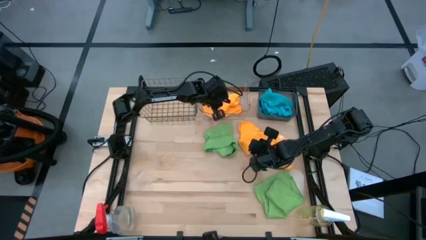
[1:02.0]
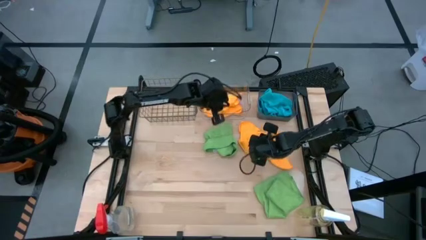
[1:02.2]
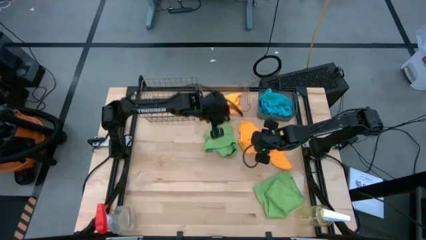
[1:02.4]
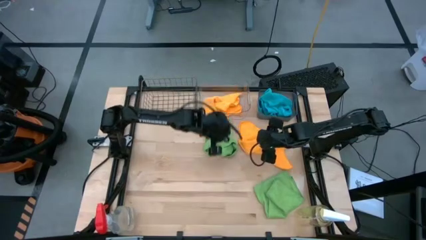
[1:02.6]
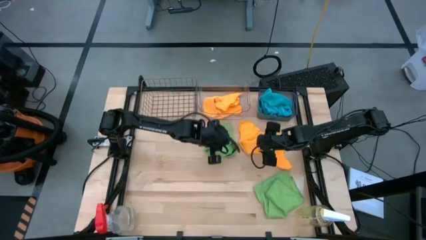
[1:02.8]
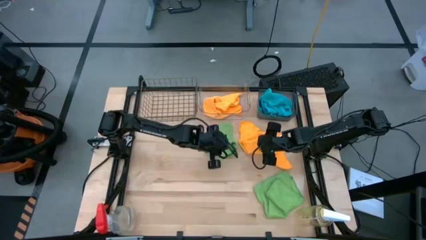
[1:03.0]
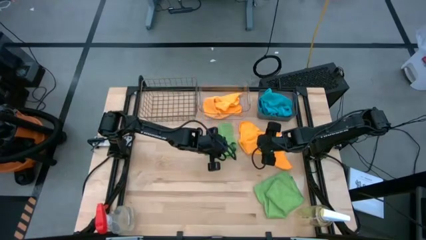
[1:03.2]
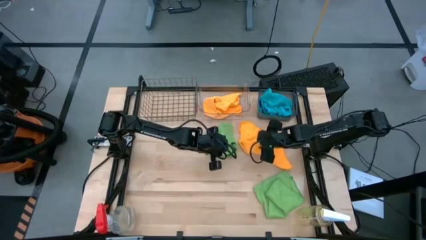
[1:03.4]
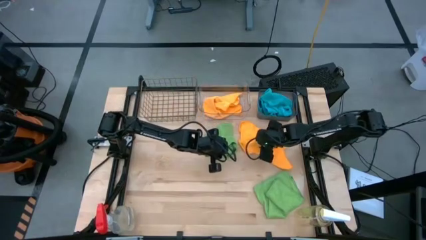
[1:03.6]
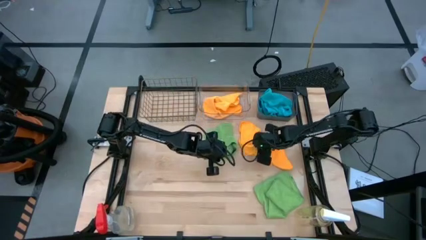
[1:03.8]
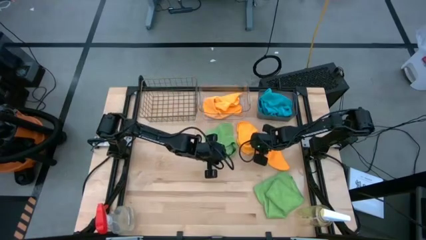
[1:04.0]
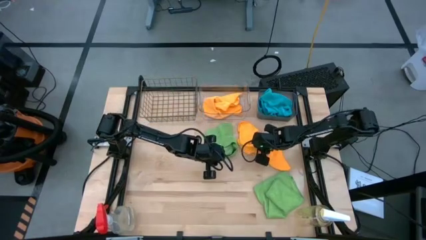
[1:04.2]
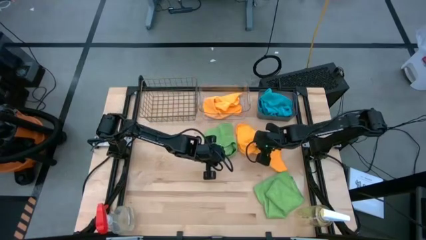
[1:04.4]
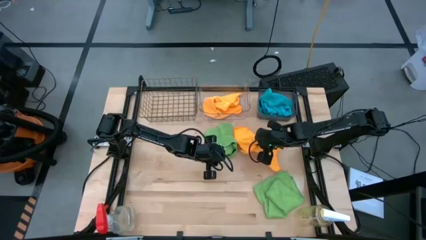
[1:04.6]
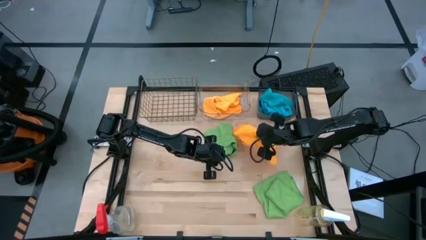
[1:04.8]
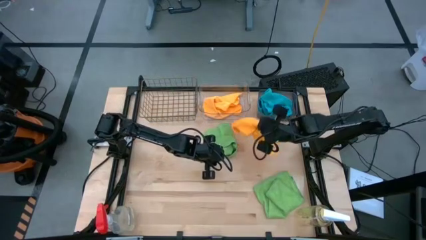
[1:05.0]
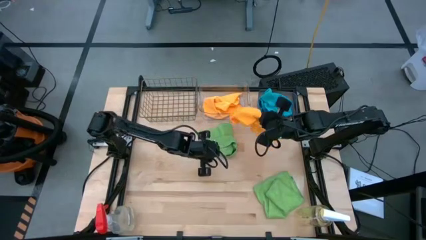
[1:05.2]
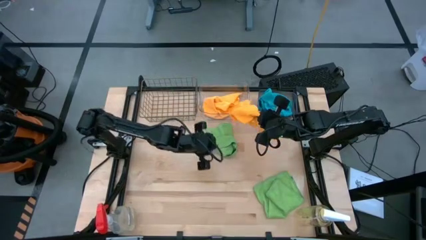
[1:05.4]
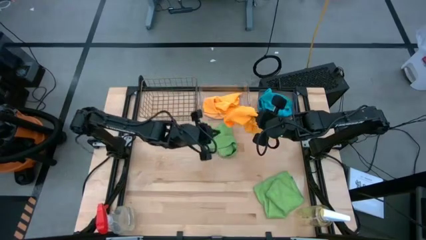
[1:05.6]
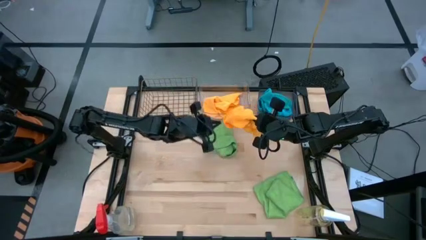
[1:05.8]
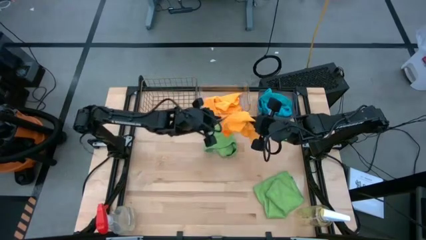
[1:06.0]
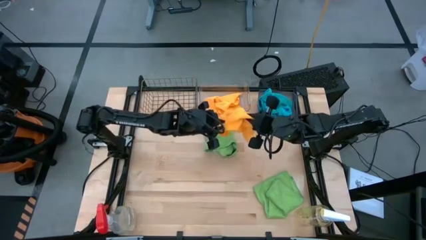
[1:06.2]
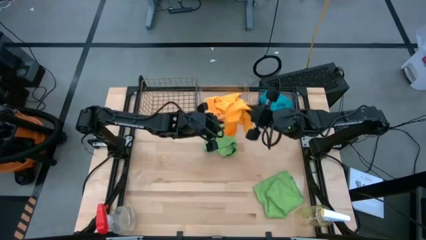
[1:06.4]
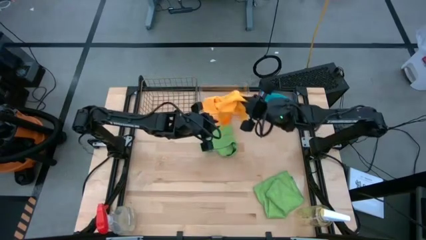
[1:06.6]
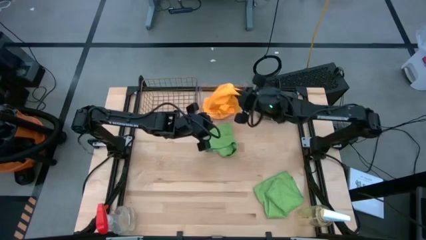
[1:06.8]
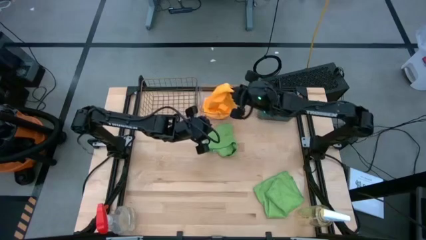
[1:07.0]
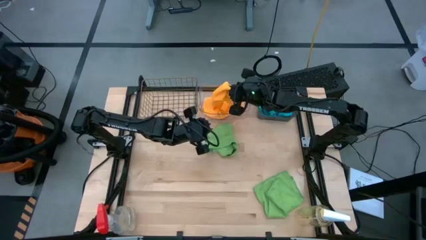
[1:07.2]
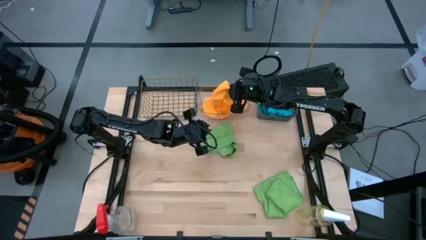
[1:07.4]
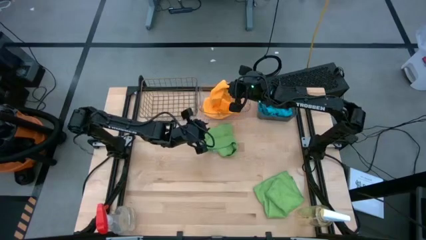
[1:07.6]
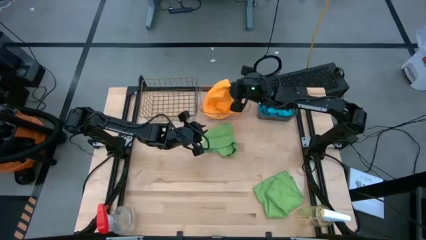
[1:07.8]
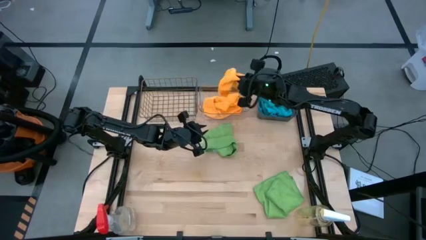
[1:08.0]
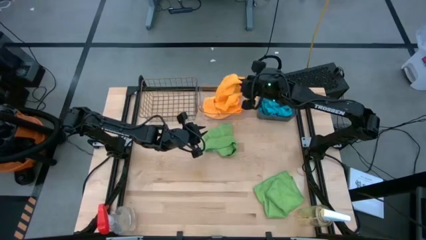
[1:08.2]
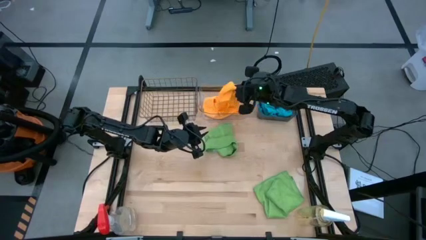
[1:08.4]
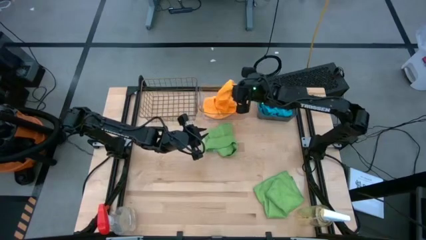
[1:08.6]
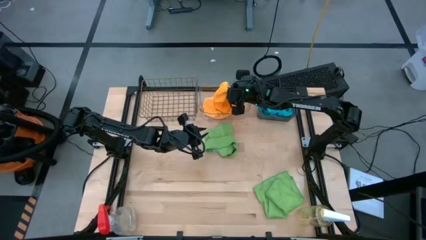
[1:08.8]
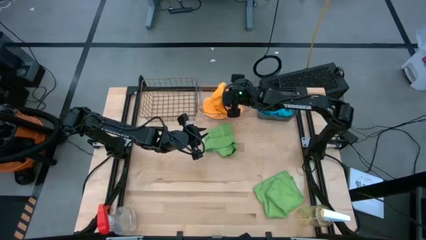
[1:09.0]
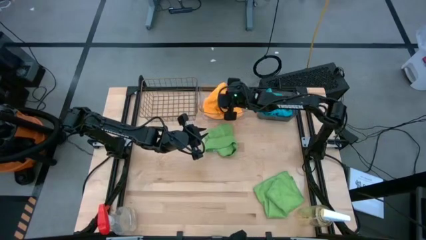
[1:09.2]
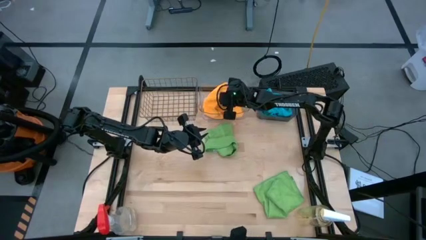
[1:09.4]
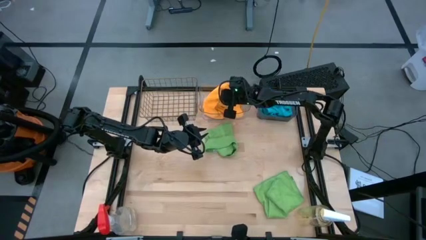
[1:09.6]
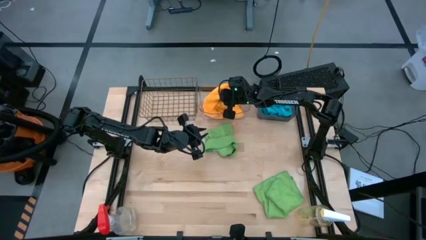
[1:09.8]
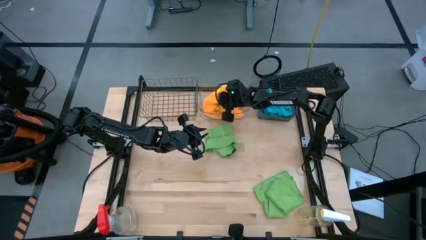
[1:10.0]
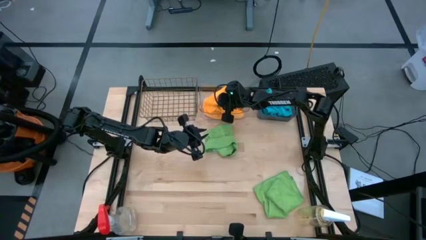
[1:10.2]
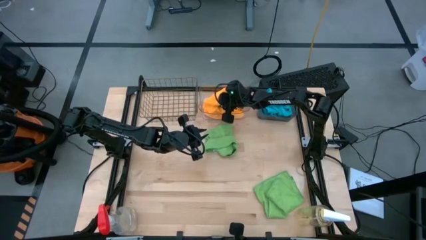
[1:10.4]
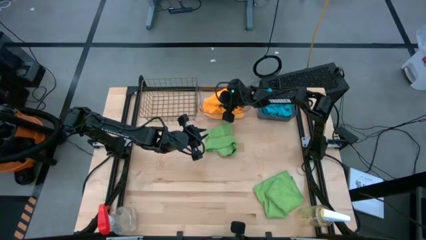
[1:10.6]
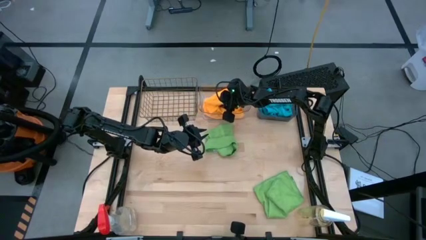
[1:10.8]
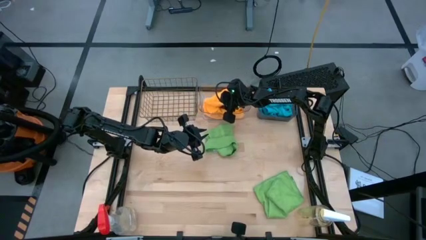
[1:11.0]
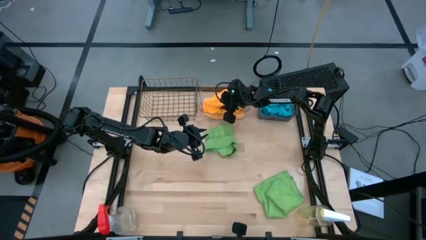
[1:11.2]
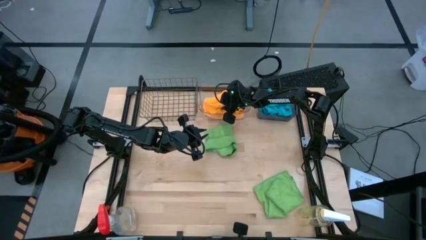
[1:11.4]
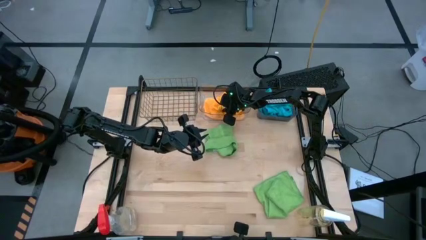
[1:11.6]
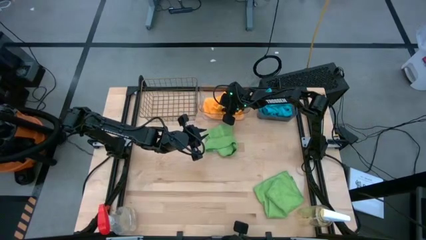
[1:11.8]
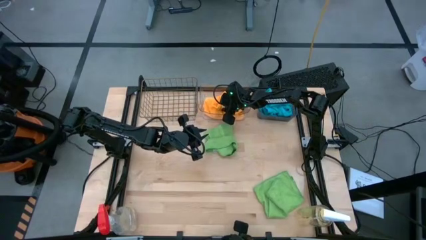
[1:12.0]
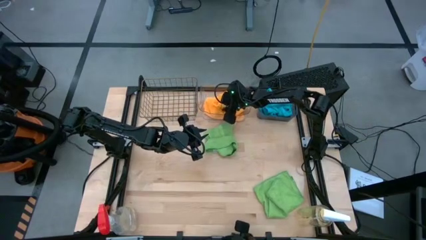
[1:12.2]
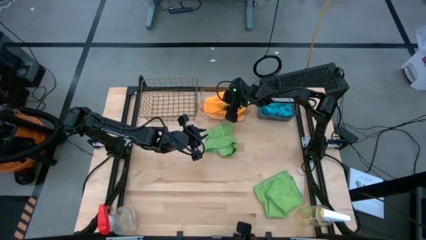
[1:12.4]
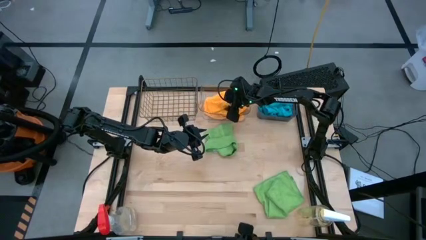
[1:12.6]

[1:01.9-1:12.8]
Task: Sort microfiber towel by color & place in baskets
Put the yellow microfiber towel into the transparent bin
